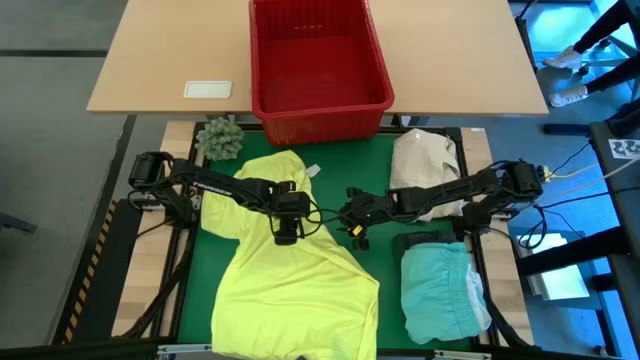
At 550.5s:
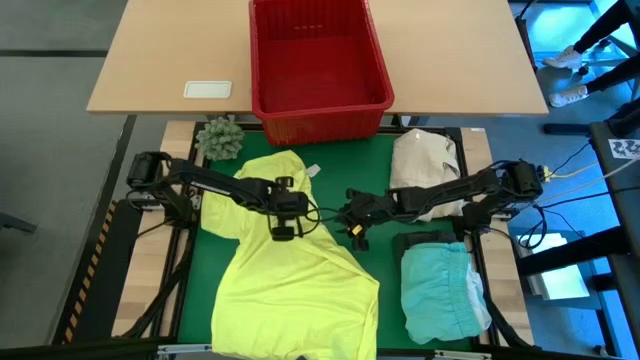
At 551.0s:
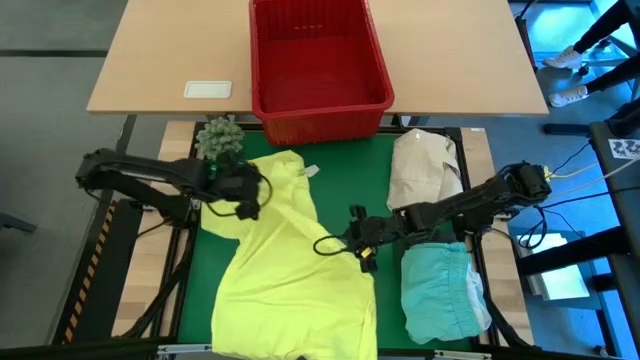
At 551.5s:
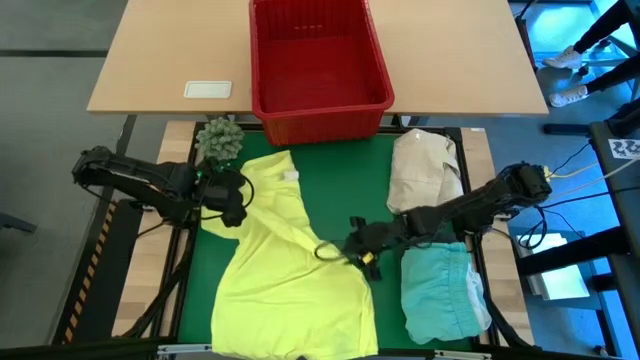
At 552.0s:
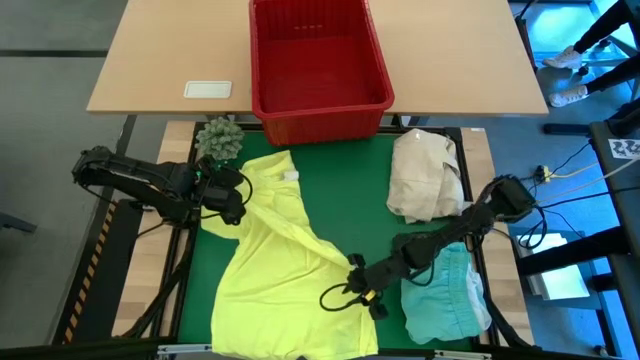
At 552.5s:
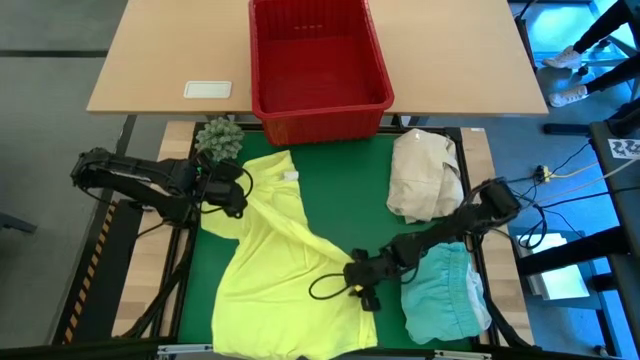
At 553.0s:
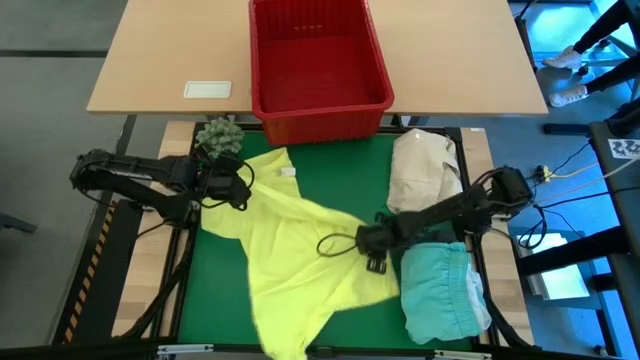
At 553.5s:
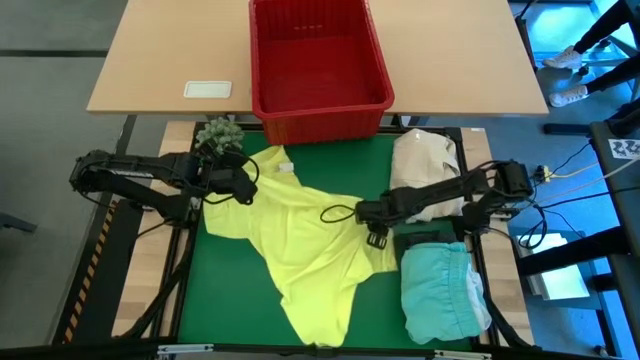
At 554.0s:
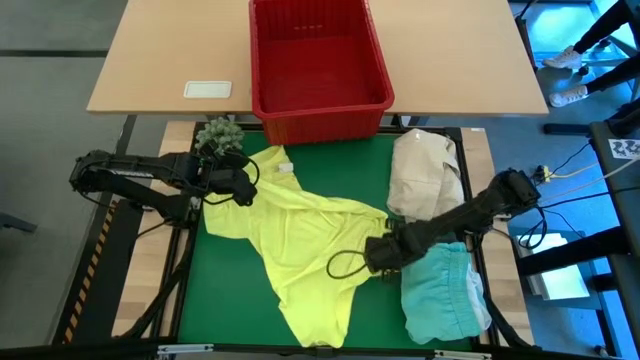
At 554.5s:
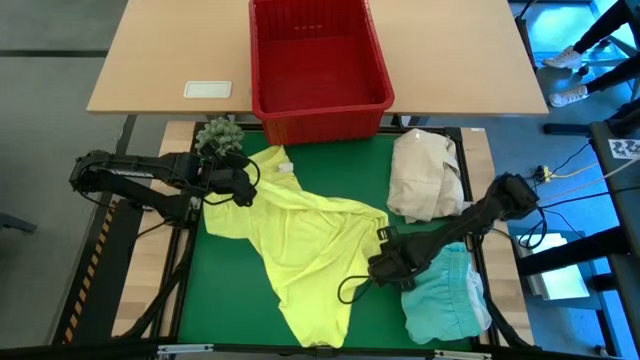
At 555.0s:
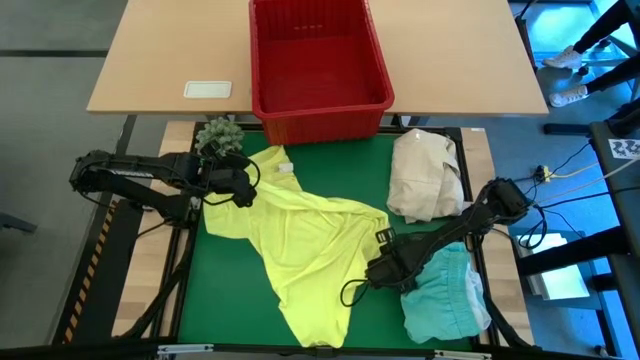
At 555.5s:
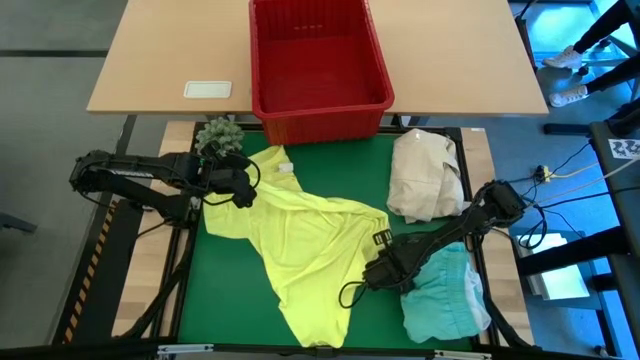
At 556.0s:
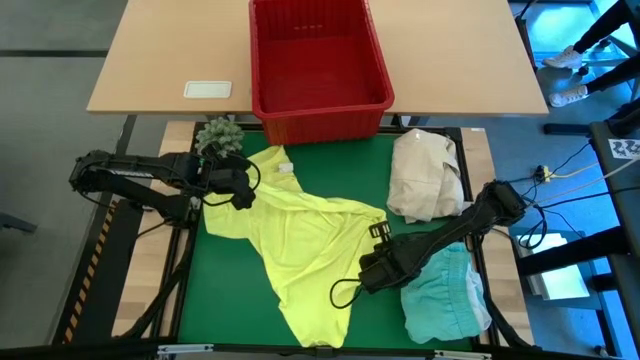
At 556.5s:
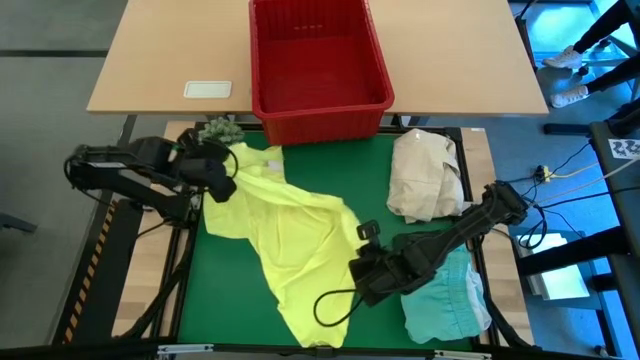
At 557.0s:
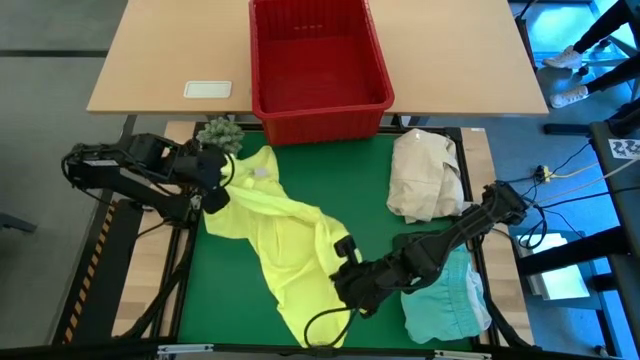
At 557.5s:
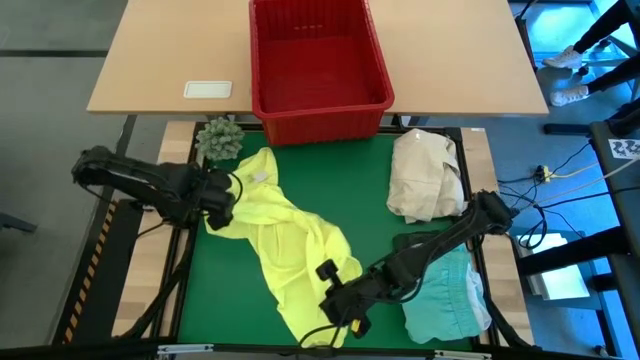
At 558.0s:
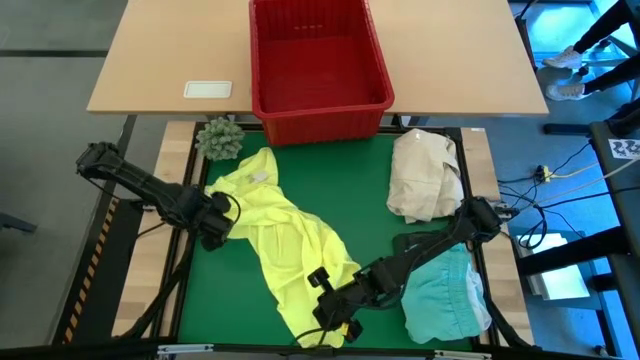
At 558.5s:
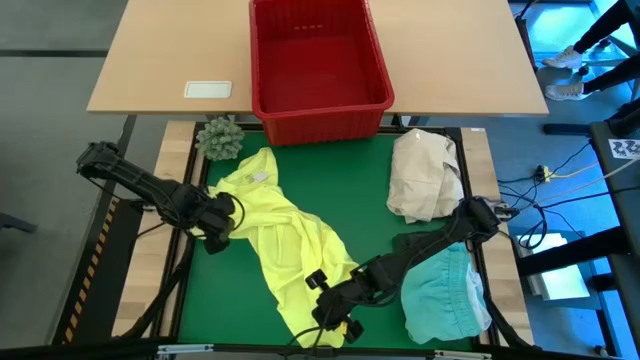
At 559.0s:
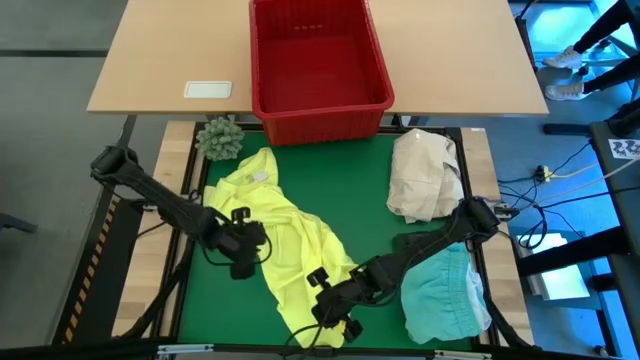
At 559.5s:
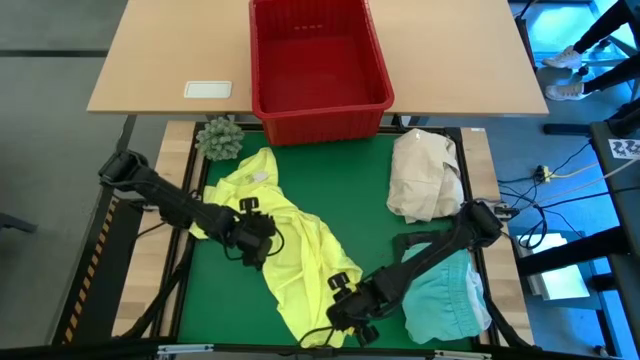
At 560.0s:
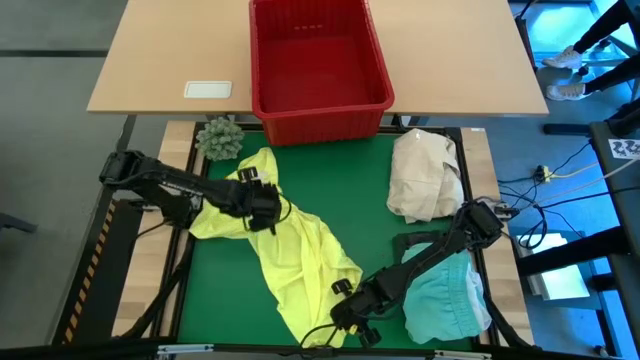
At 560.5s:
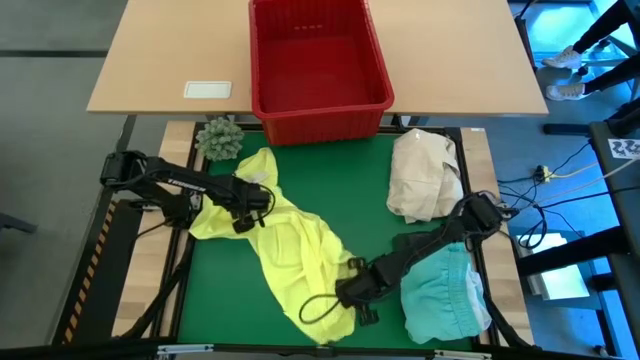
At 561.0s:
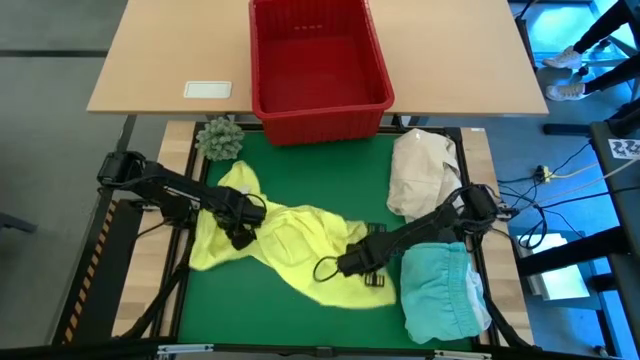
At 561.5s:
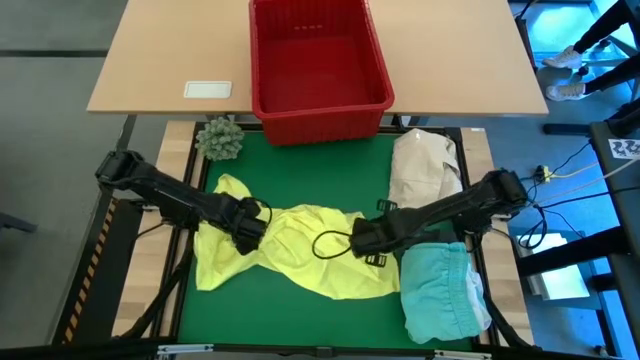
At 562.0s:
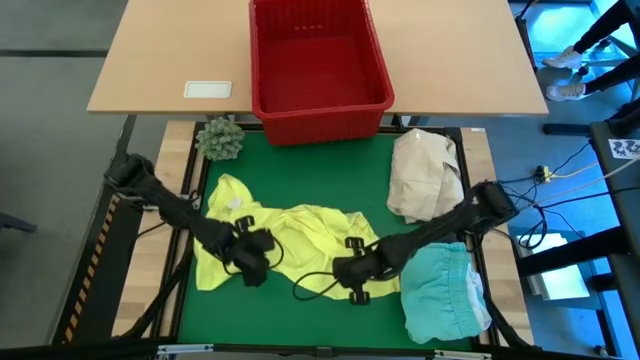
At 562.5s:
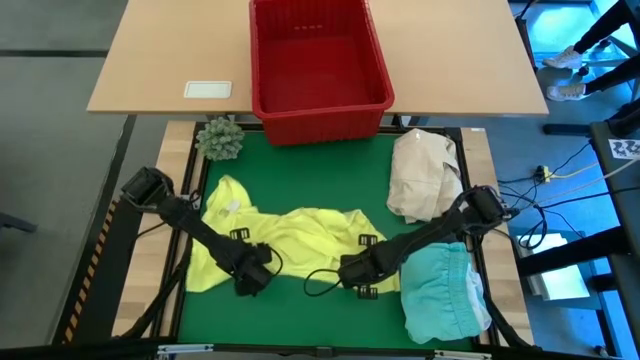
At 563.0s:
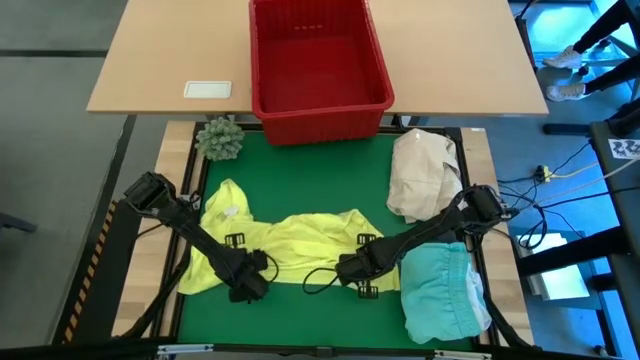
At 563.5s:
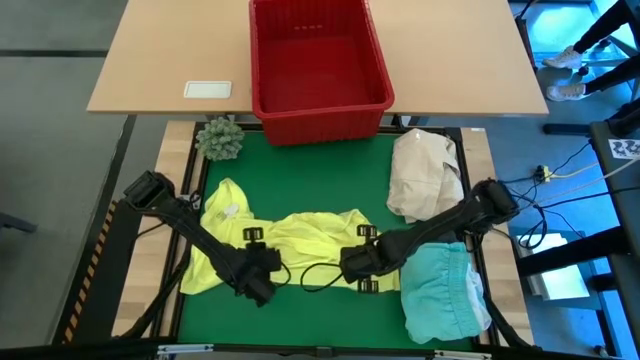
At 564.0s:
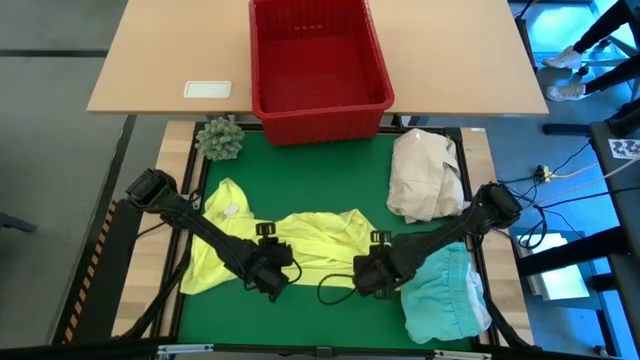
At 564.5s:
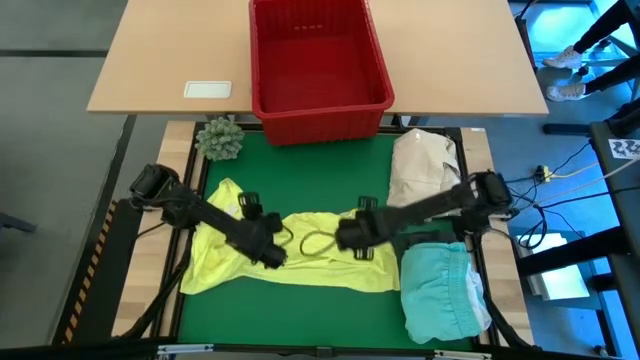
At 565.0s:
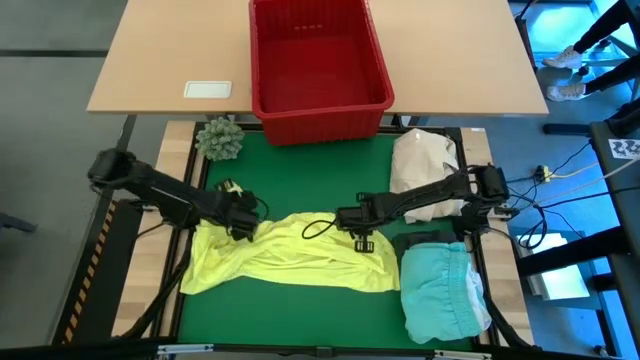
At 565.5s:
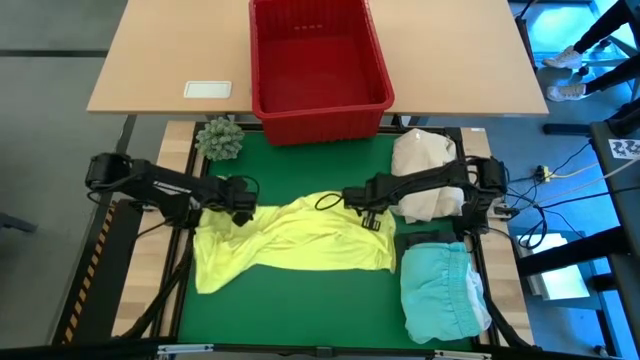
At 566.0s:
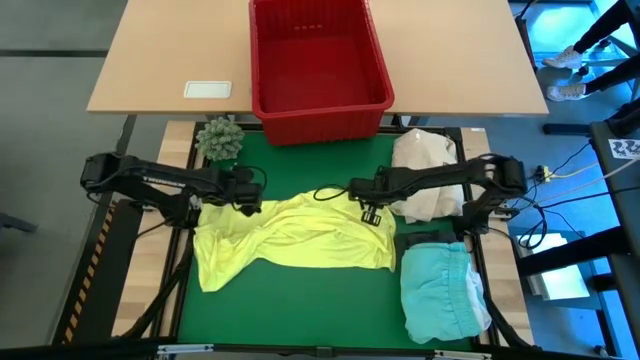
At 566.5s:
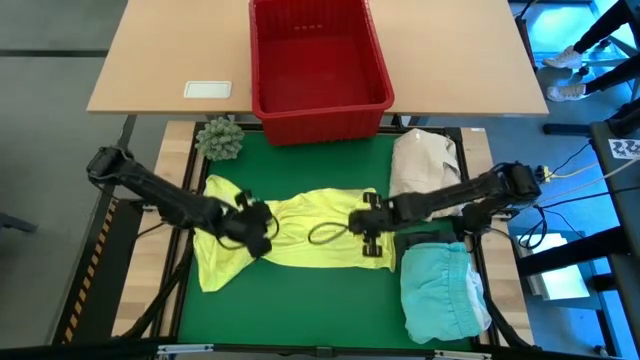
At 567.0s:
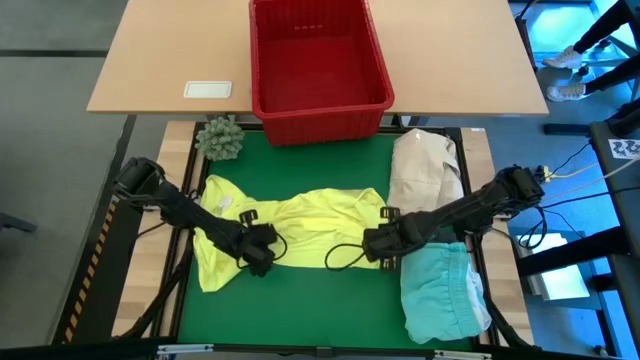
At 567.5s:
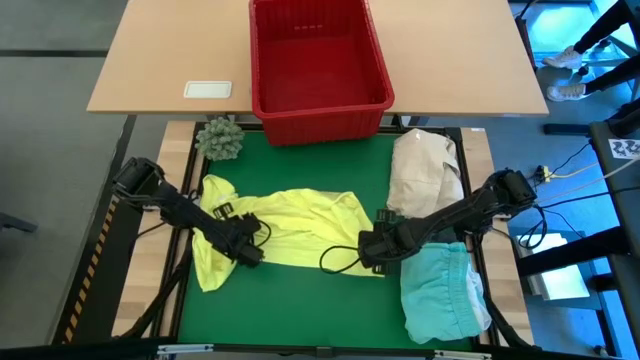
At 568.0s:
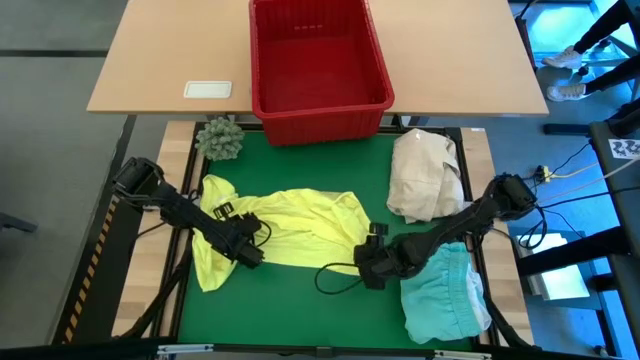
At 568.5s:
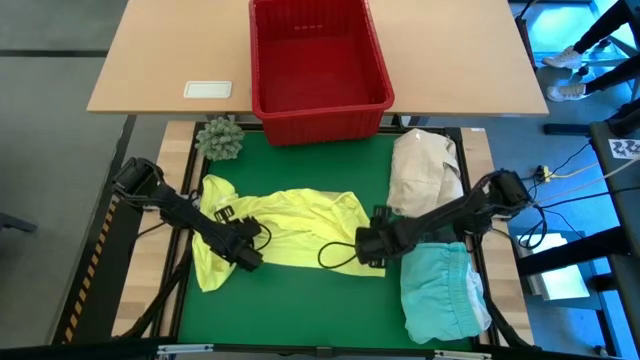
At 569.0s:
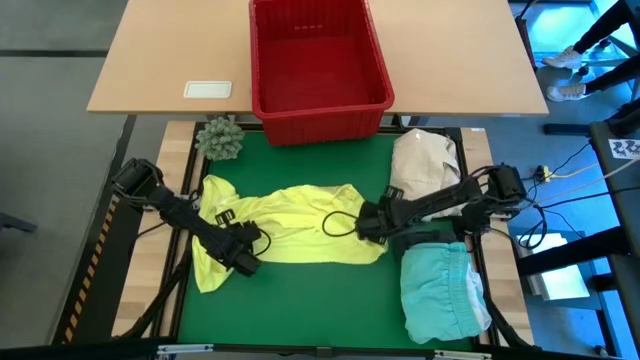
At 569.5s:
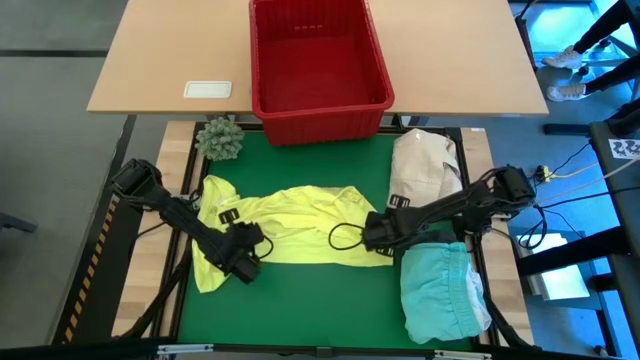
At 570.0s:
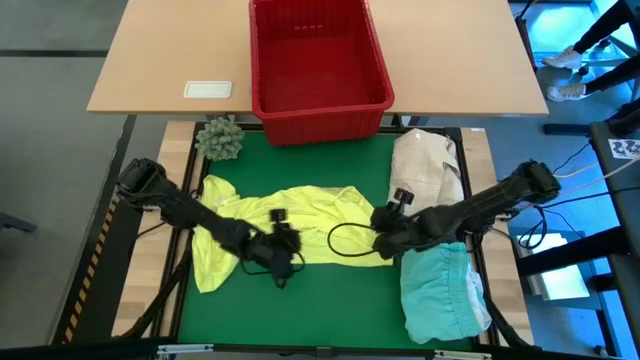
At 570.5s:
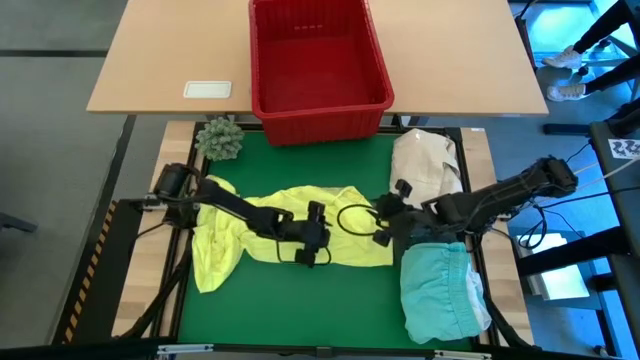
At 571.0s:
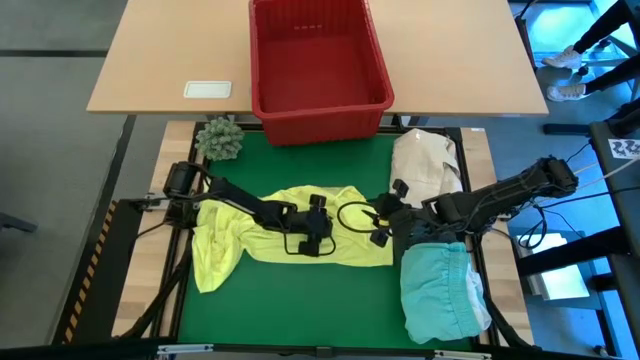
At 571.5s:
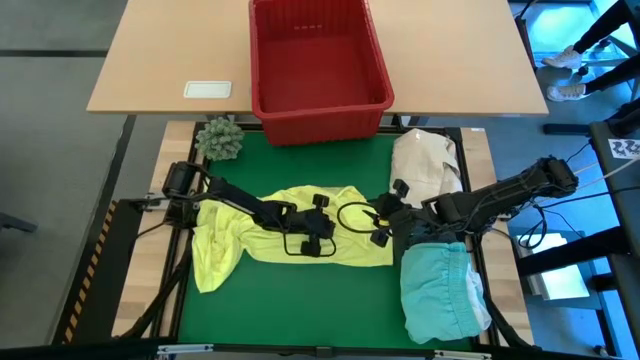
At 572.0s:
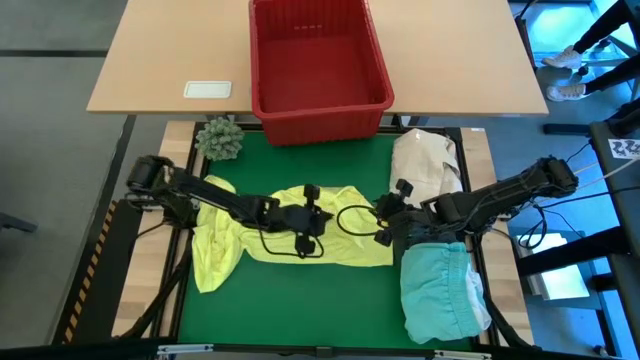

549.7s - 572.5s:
Task: Fold Laundry from Bin
Fold the yellow shirt
